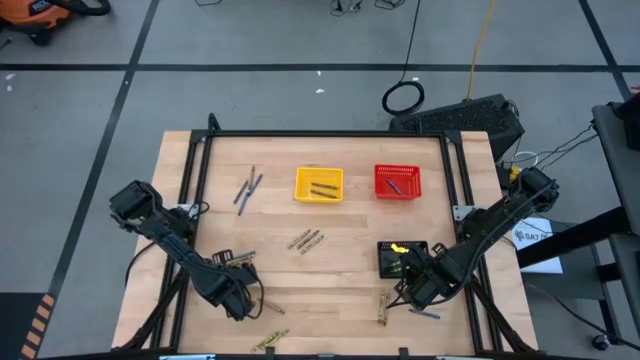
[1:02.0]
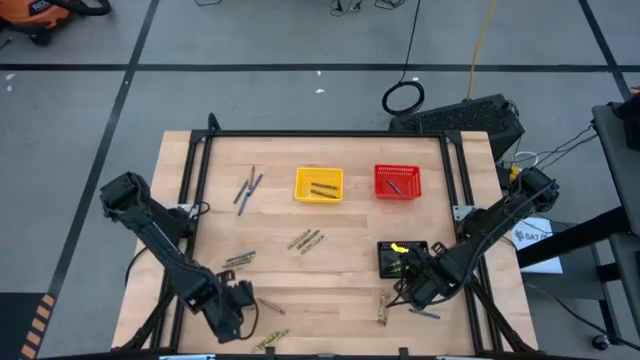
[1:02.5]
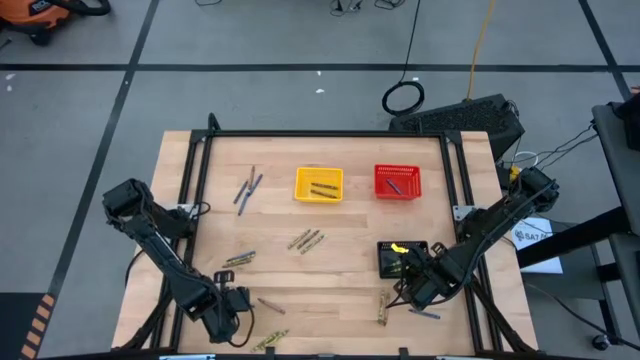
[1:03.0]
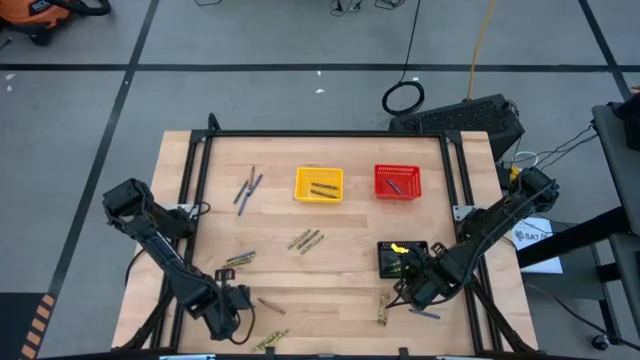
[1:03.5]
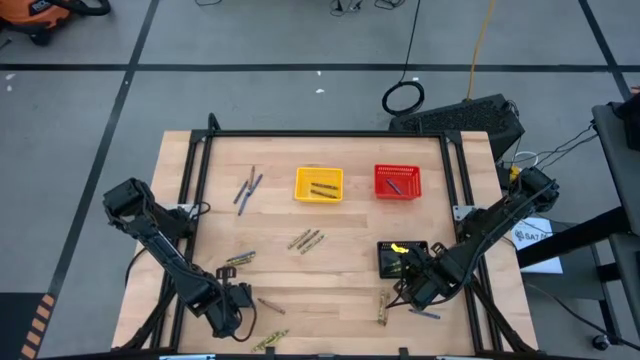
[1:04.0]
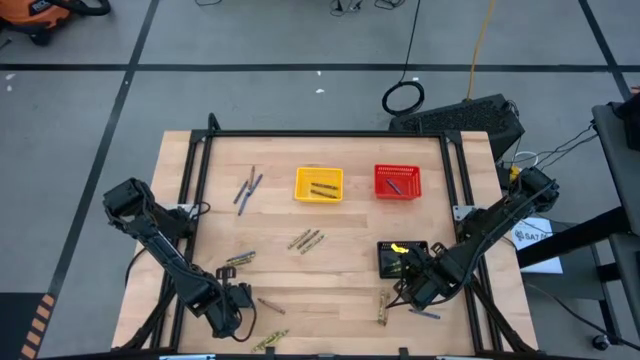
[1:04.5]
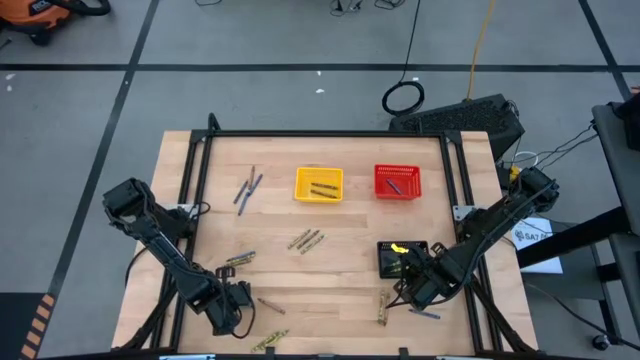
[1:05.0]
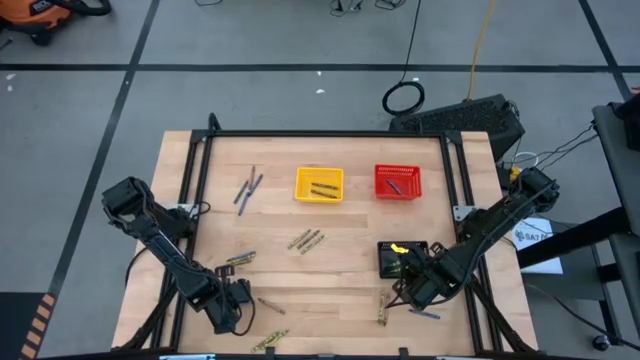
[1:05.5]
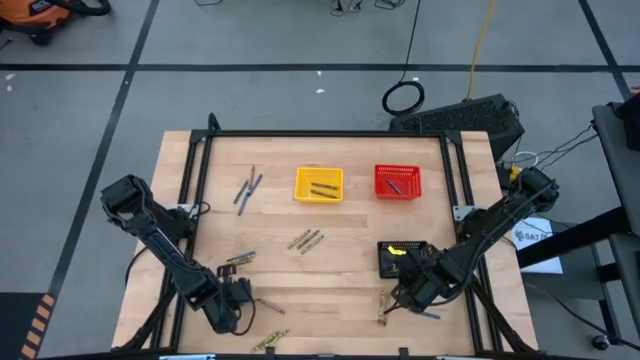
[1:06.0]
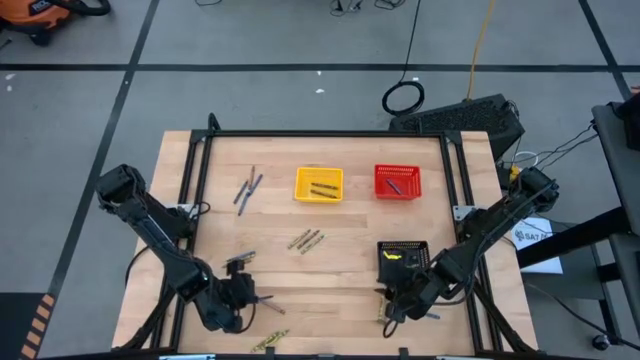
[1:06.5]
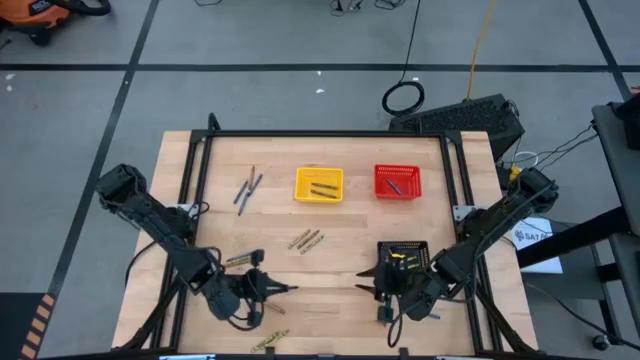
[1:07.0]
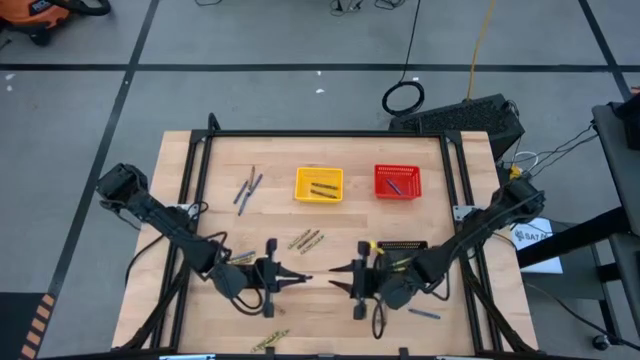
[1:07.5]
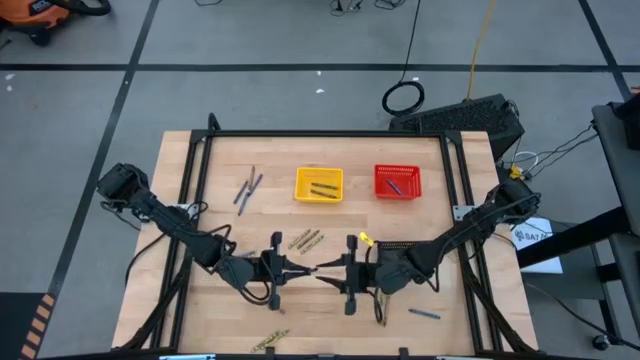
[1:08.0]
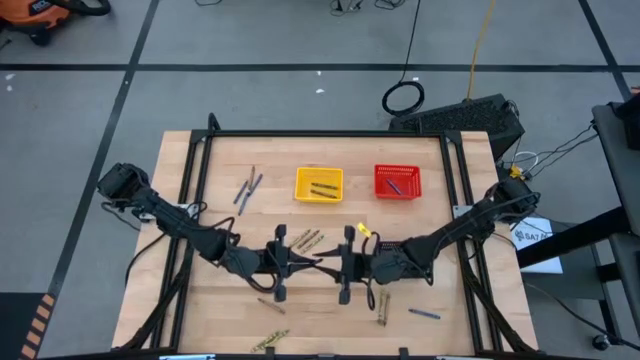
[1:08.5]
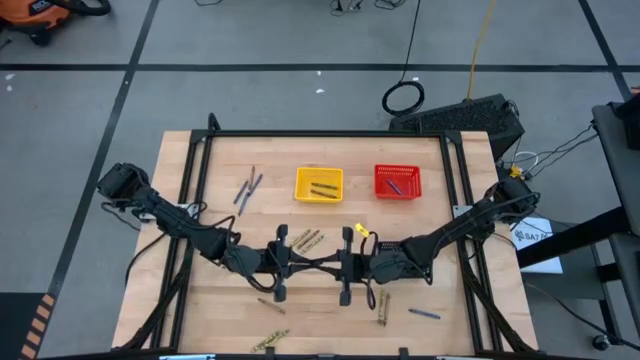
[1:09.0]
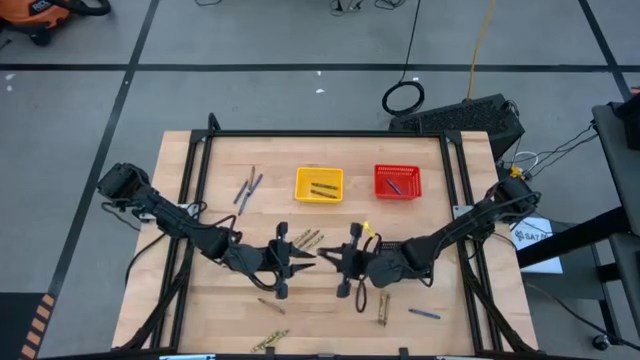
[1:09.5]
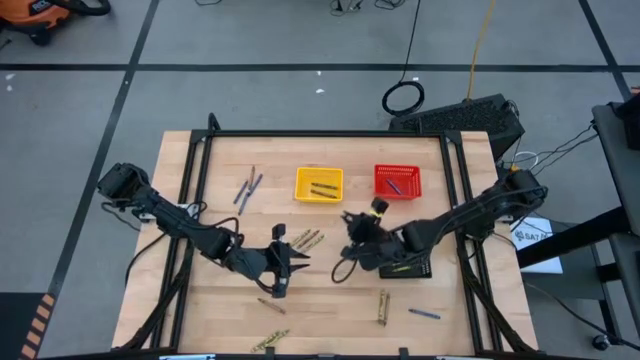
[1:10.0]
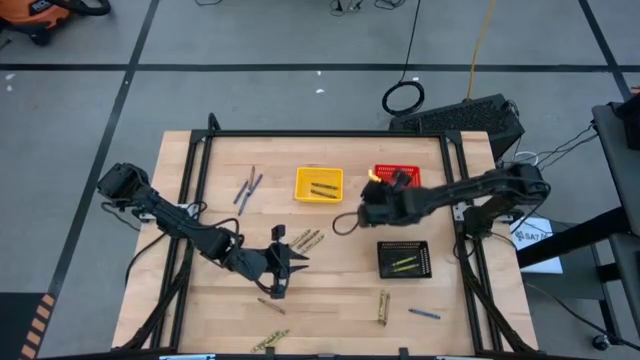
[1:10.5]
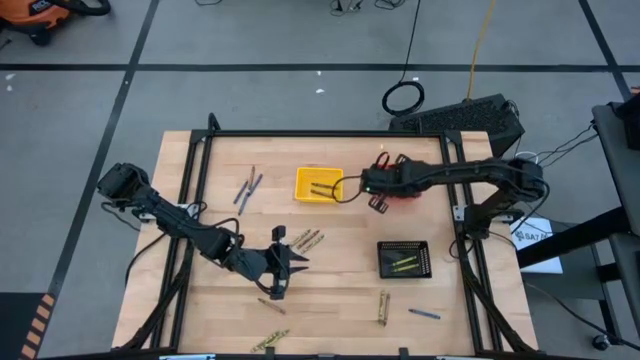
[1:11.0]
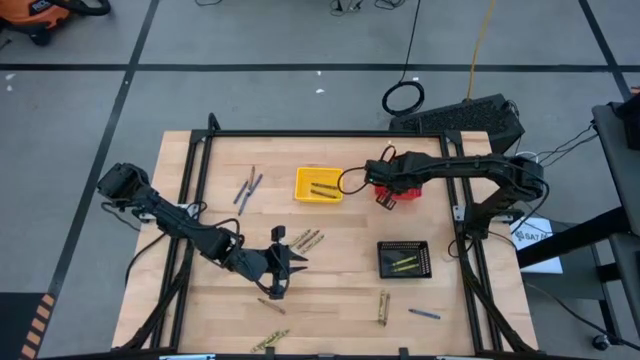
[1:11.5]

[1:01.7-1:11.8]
Task: Sort crayons
Put the blue crayon into the red bin

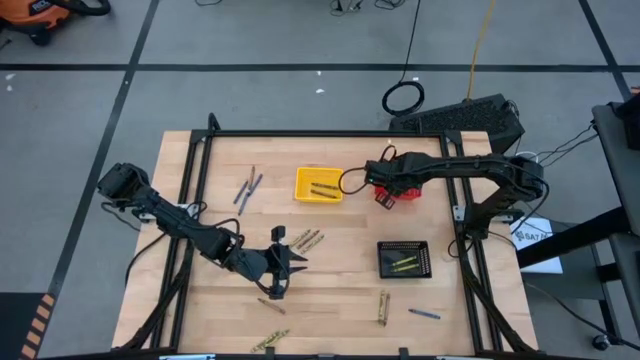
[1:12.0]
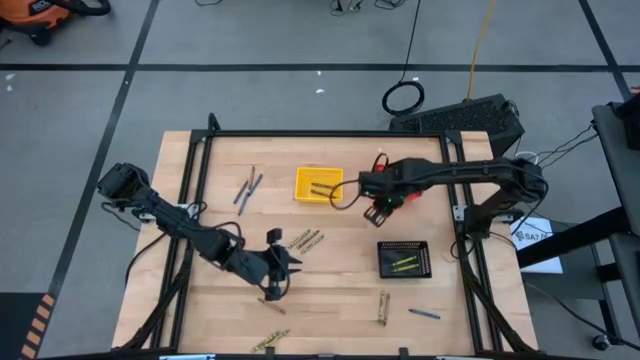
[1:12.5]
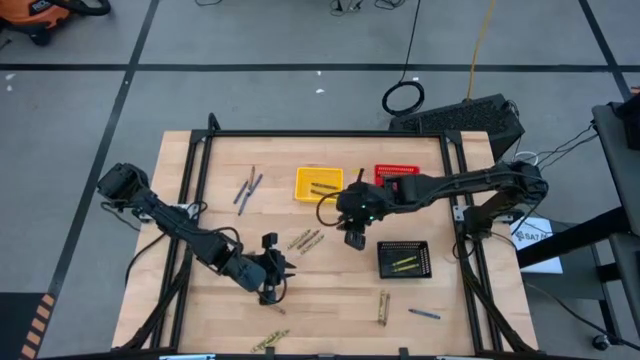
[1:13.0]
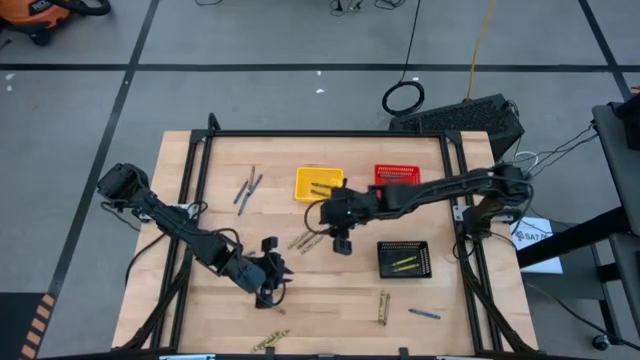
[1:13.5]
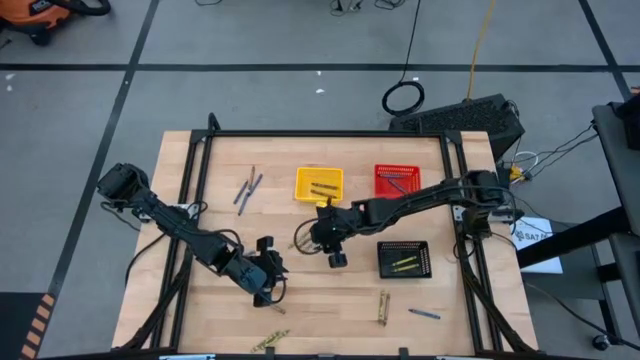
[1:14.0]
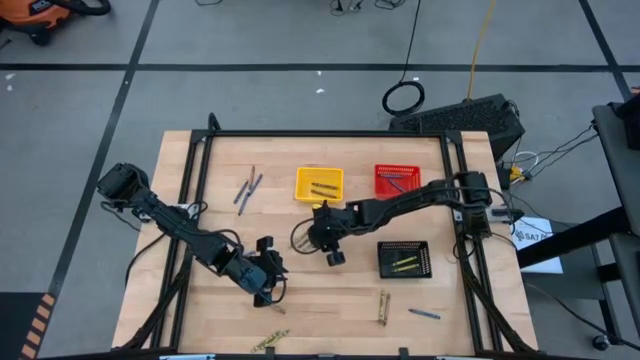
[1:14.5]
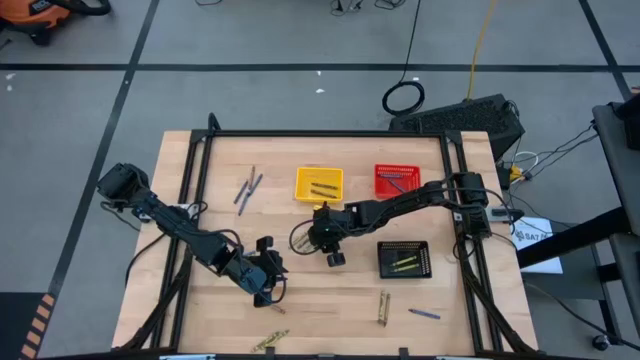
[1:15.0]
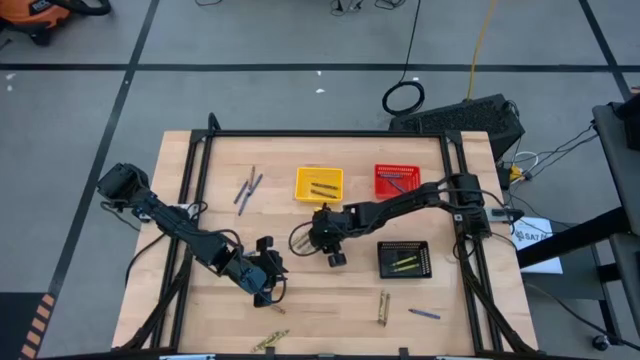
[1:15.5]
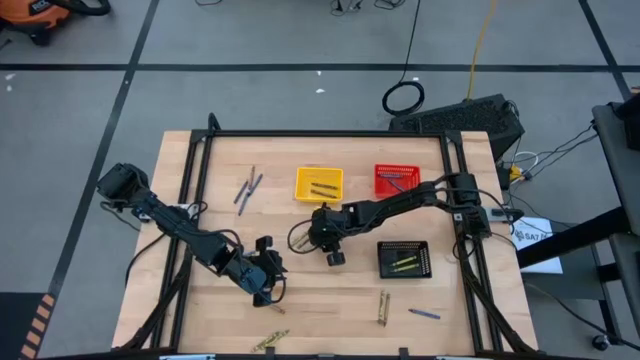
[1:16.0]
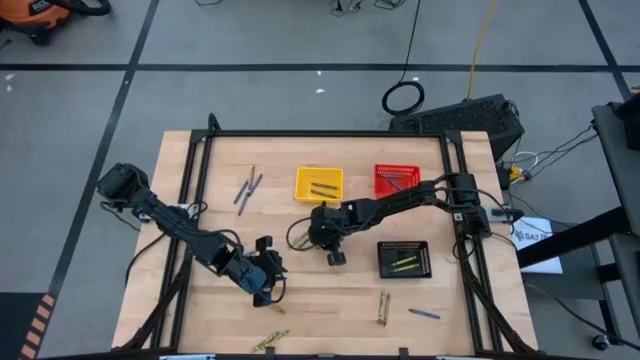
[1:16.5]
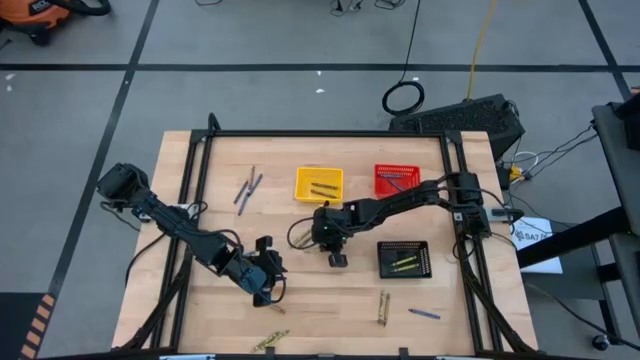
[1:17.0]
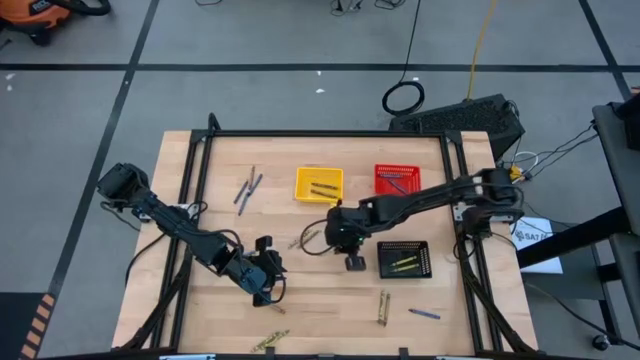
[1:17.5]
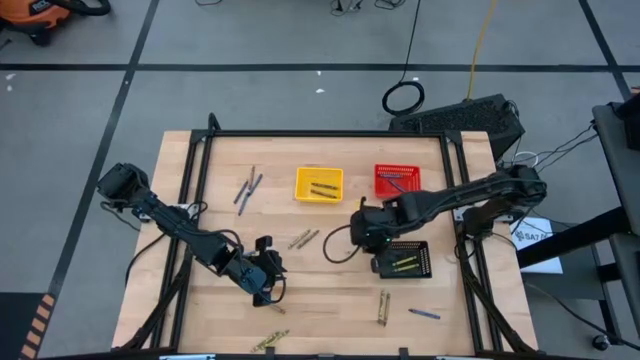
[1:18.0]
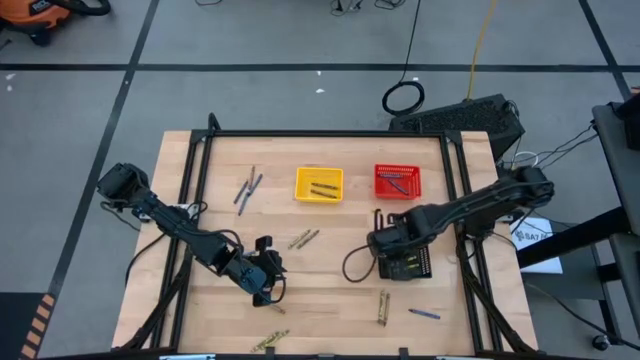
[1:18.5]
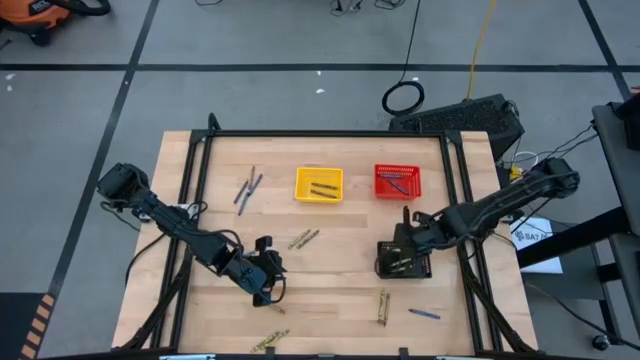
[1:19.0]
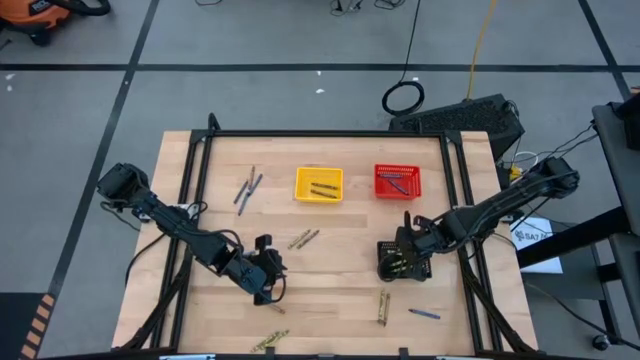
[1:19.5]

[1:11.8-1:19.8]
Put the green crayon into the black bin

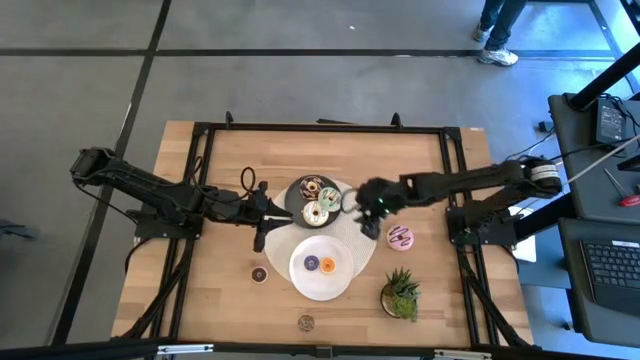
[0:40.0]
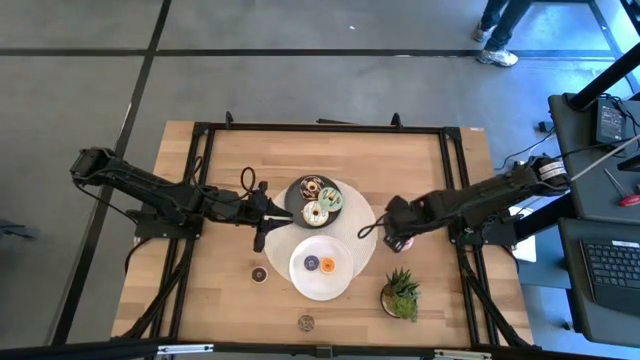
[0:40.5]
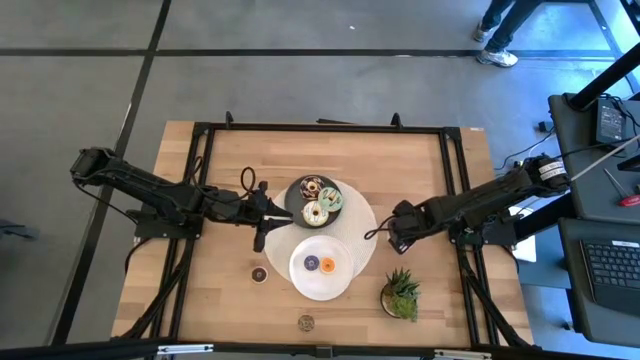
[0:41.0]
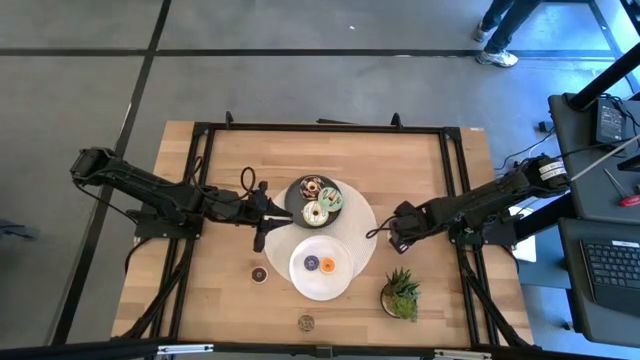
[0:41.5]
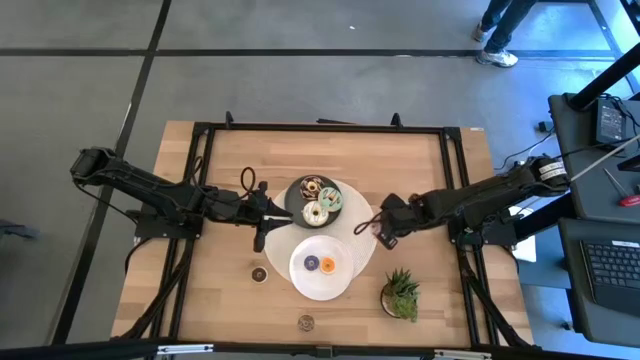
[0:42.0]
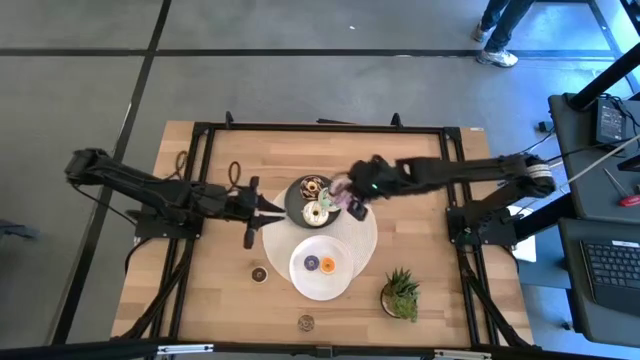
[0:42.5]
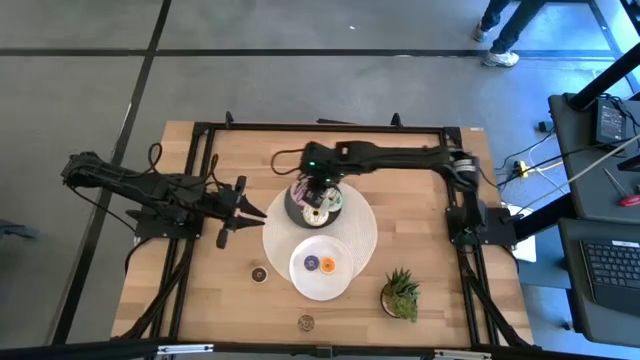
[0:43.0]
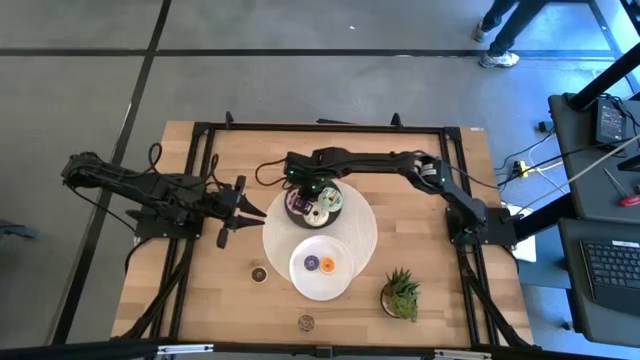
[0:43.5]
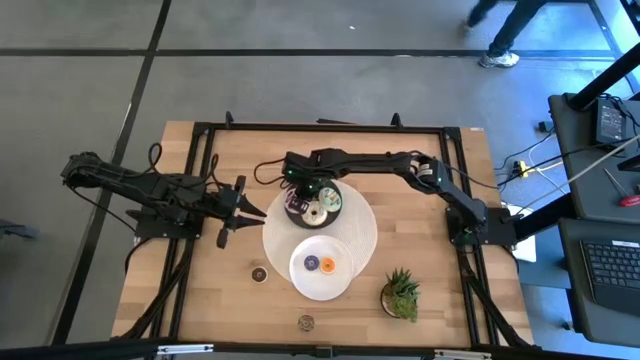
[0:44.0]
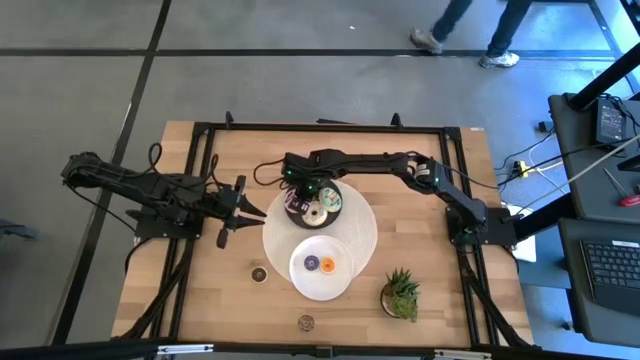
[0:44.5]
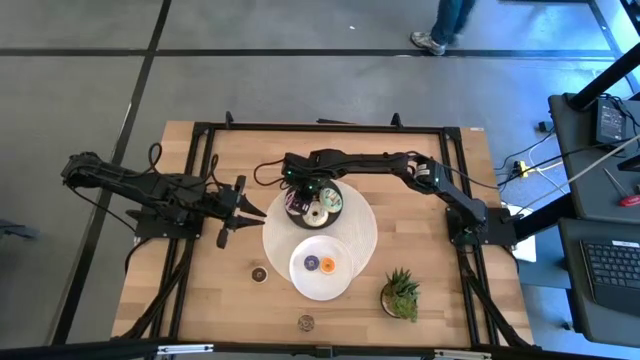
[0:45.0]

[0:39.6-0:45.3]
Task: Pick & Place donuts
Put the big purple donut on the gray plate
